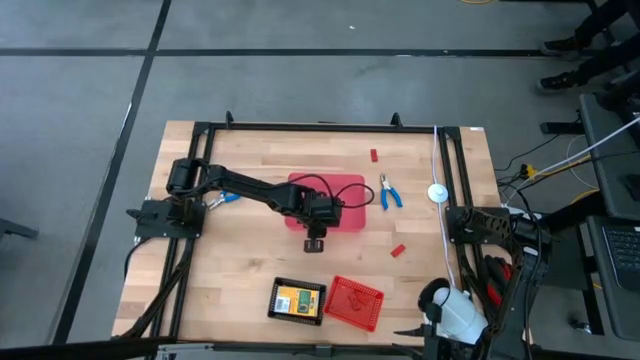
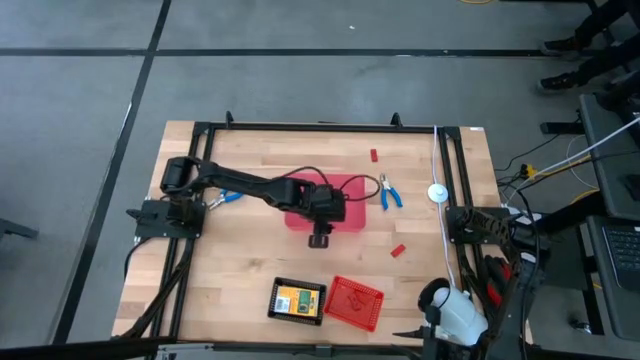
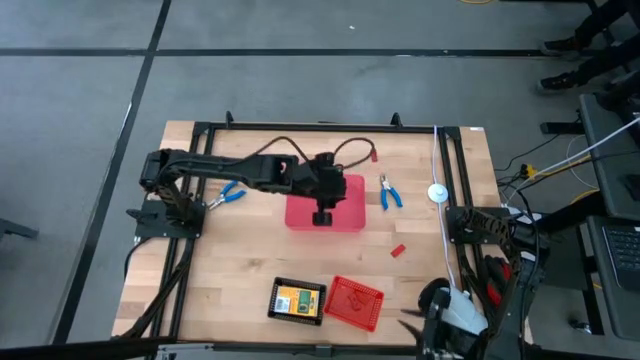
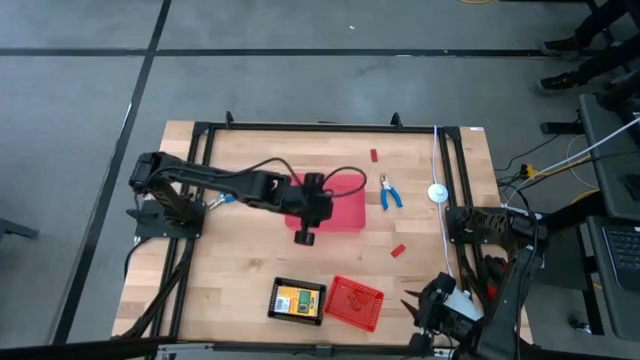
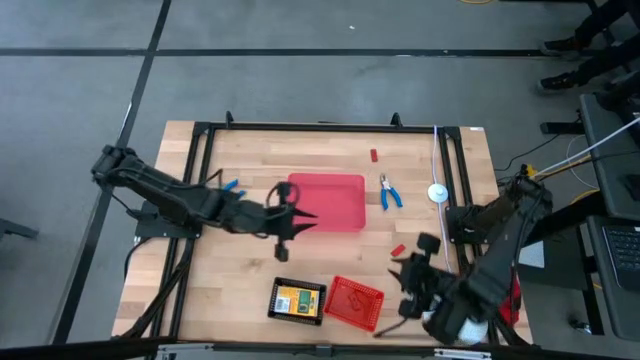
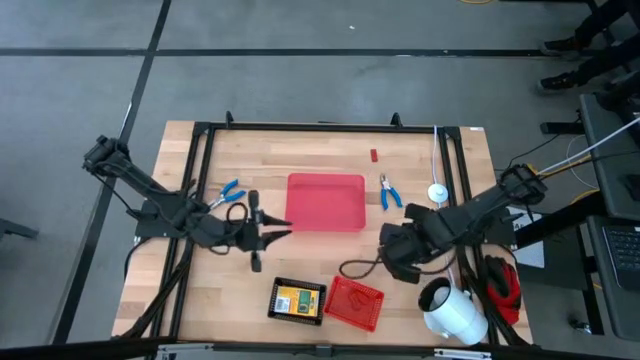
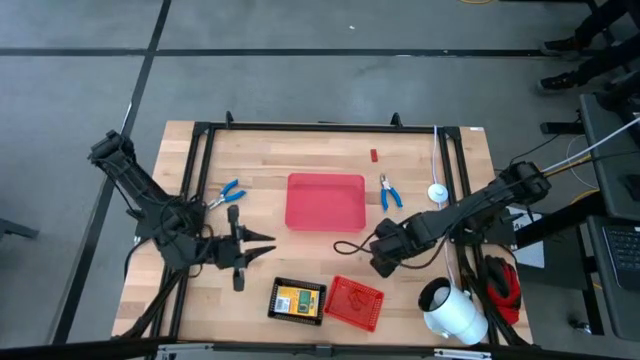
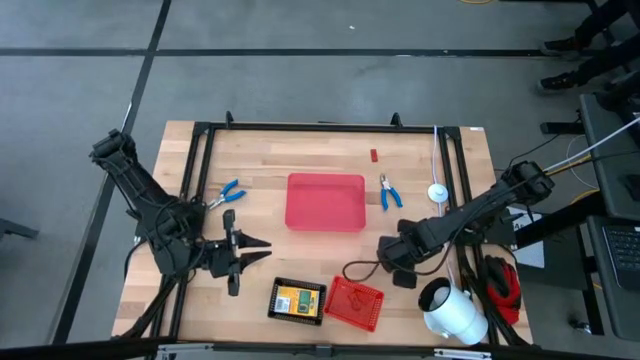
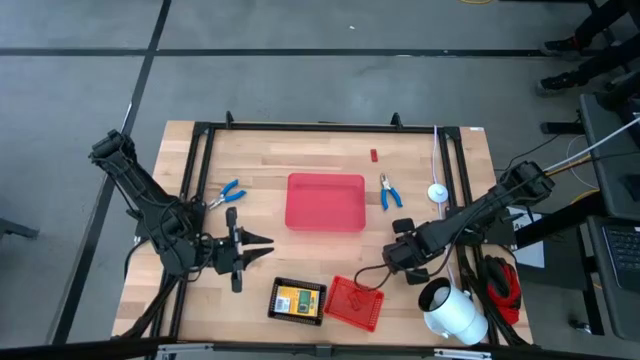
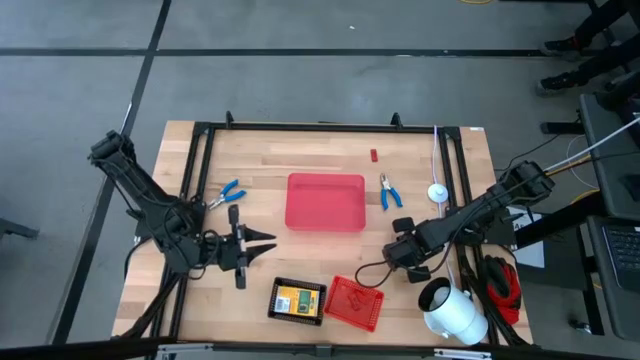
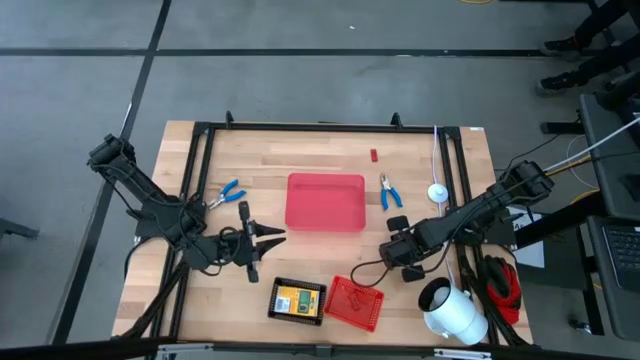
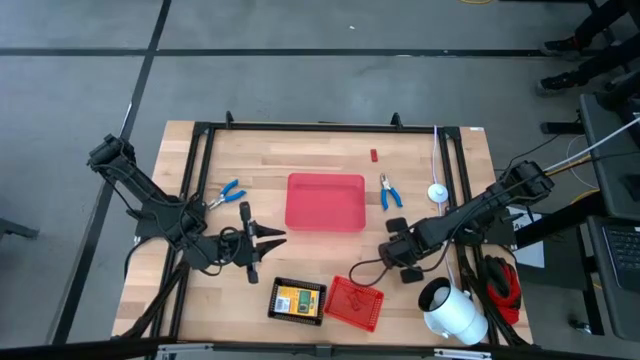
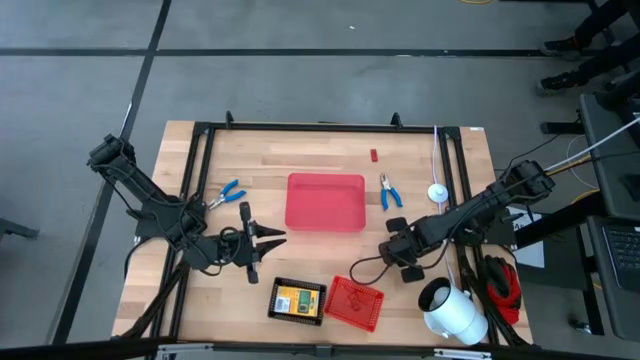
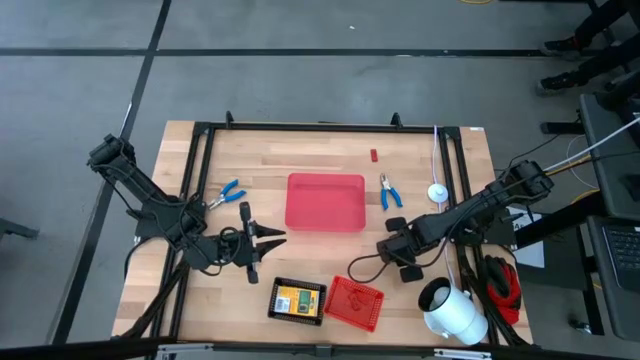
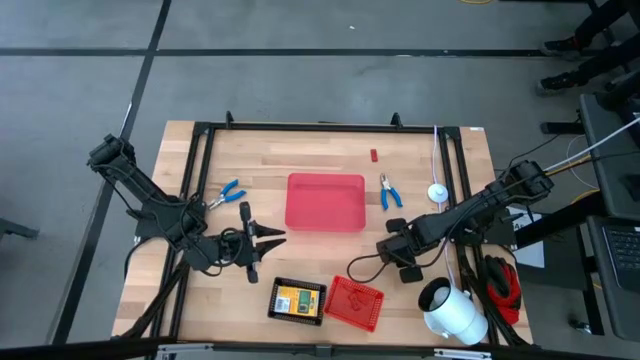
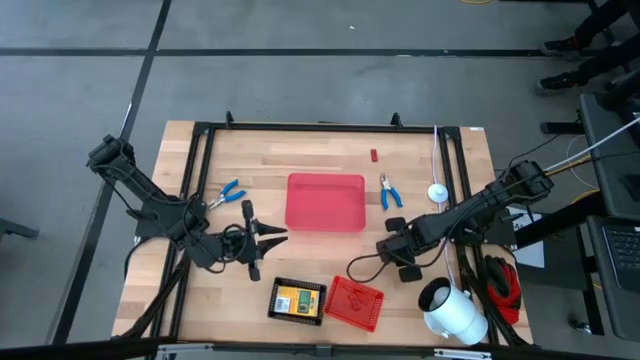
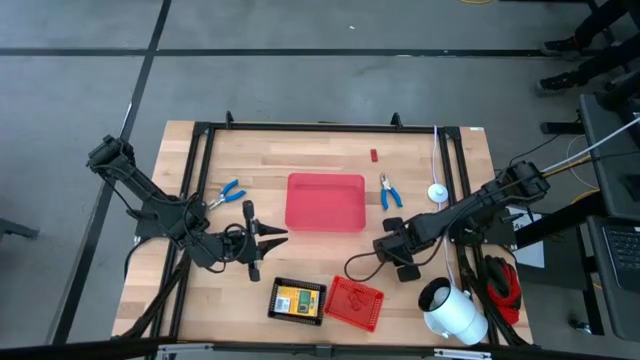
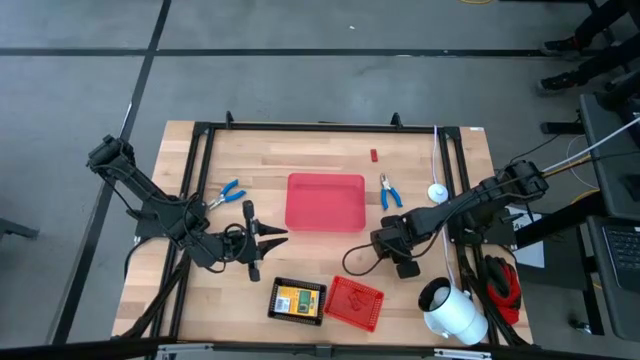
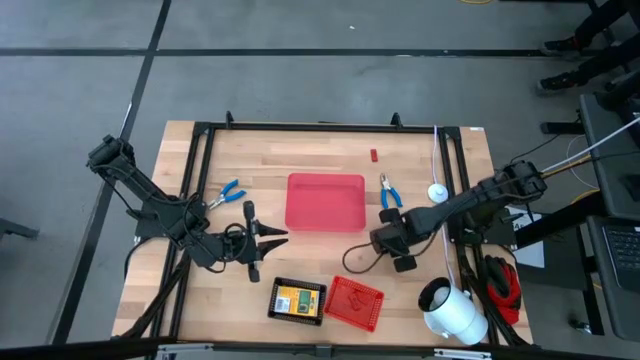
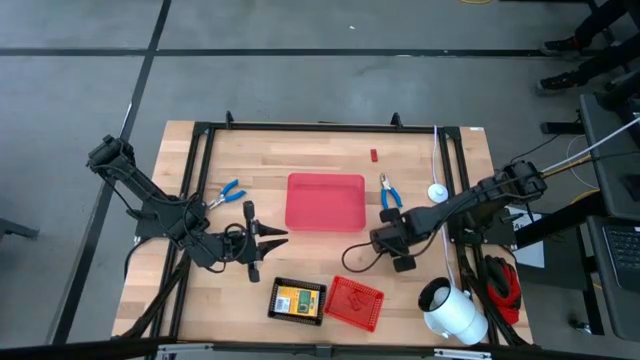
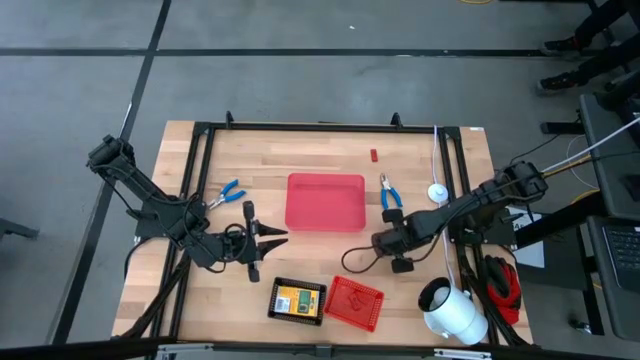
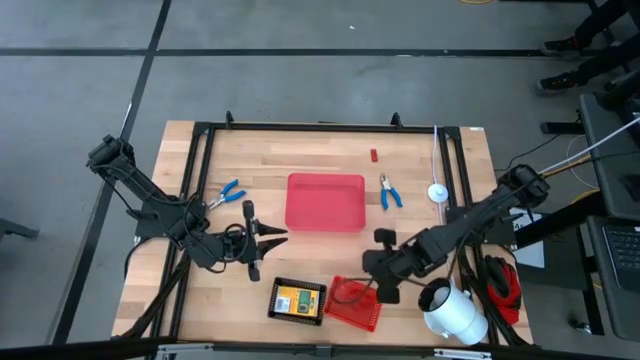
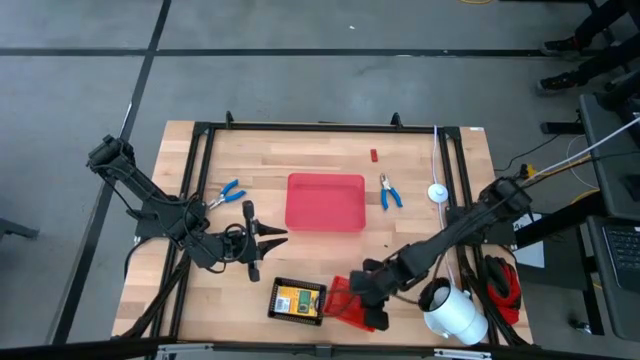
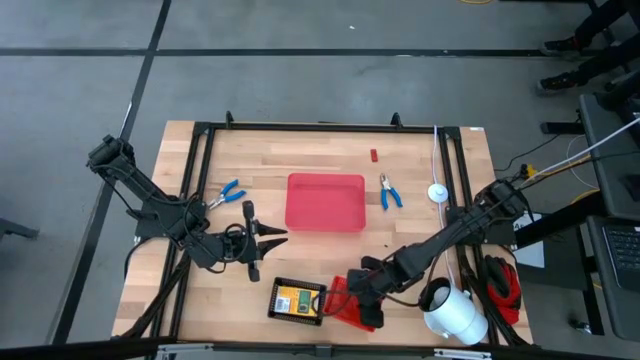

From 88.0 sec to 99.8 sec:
Task: Pick & Place School Supplies
Put the red eraser into the red bin

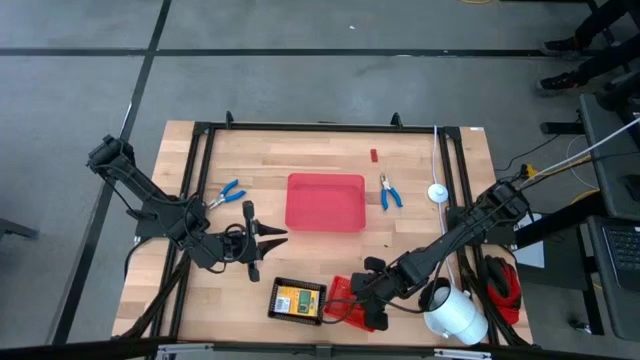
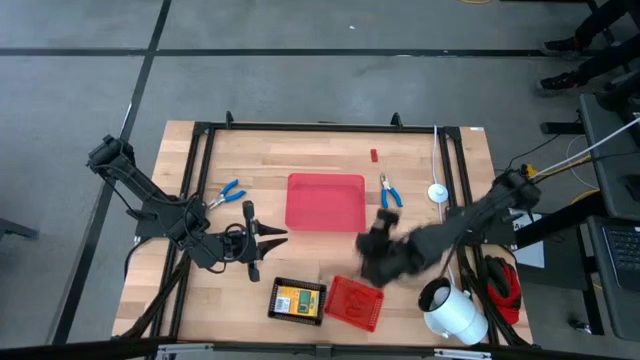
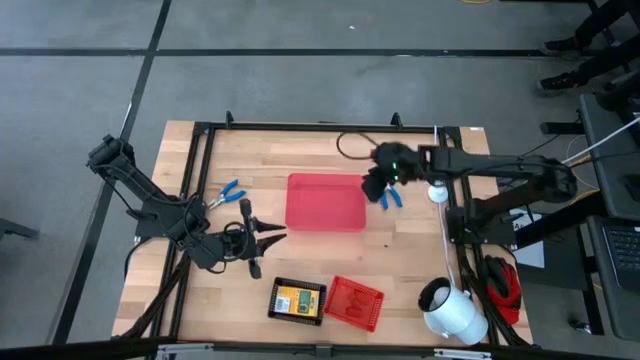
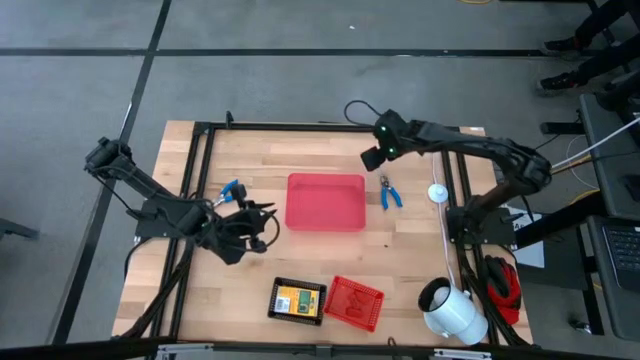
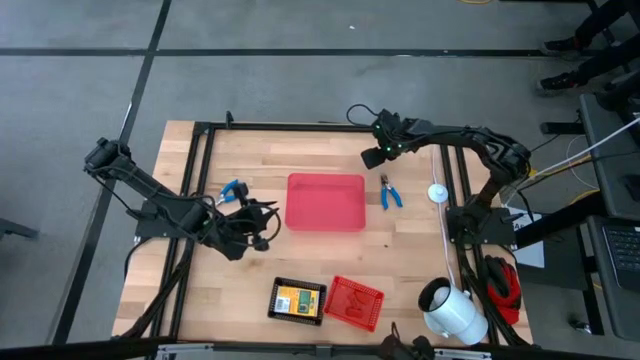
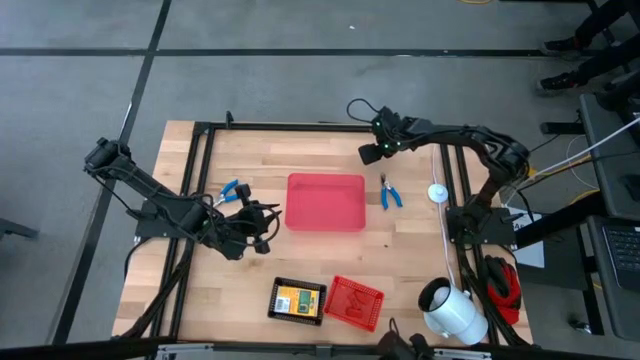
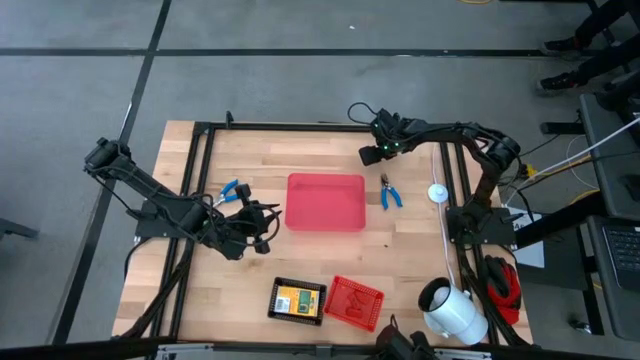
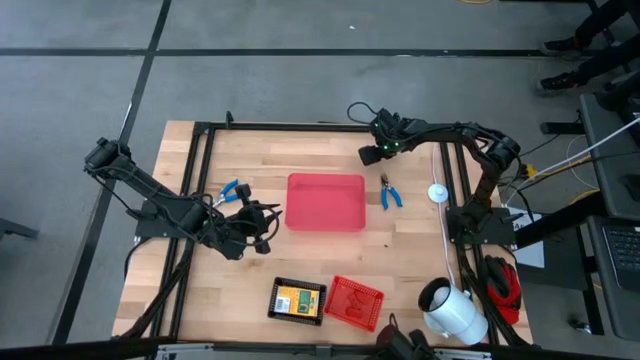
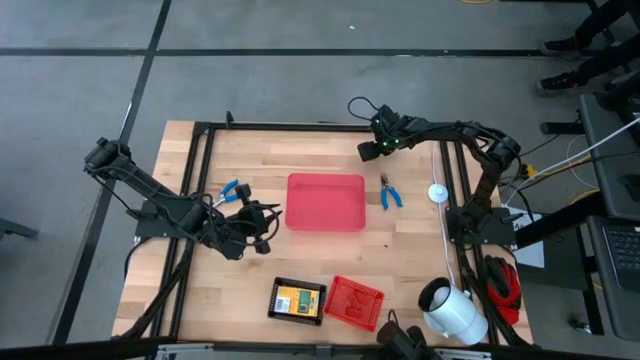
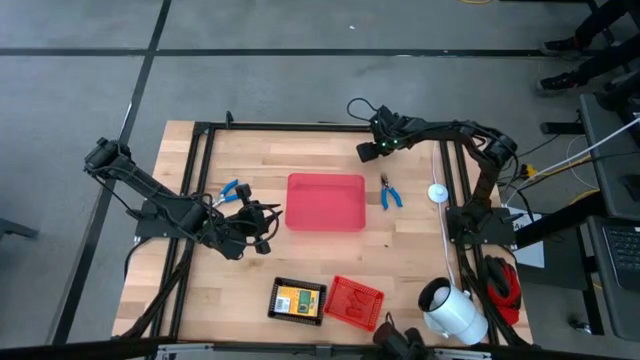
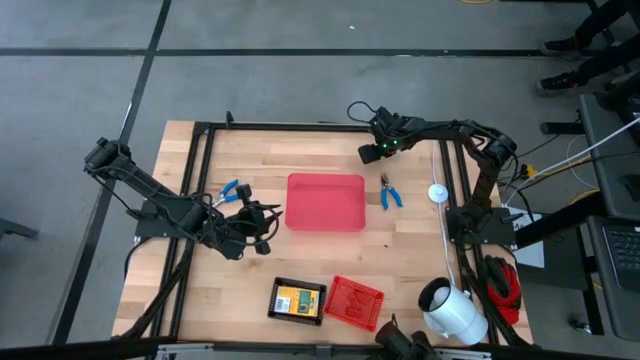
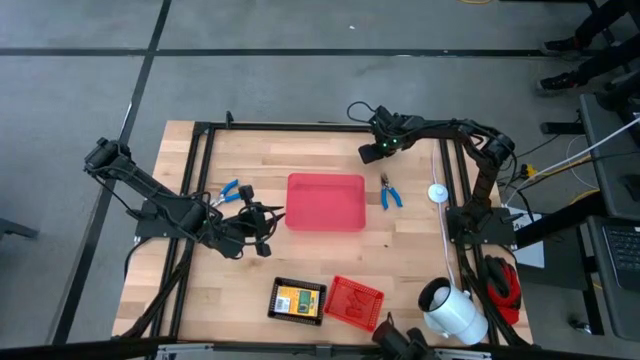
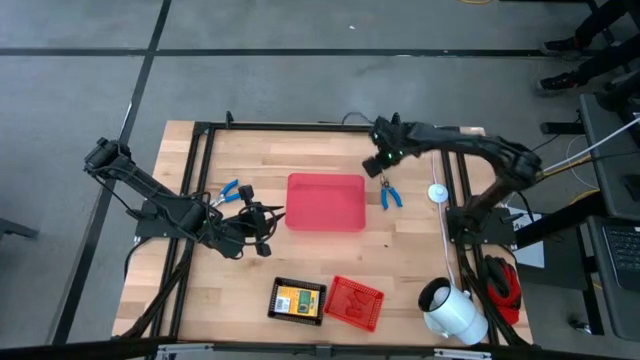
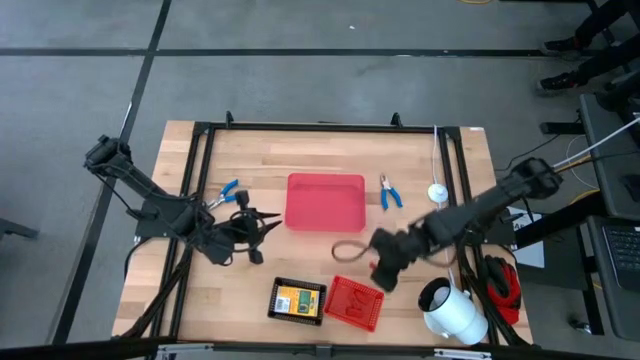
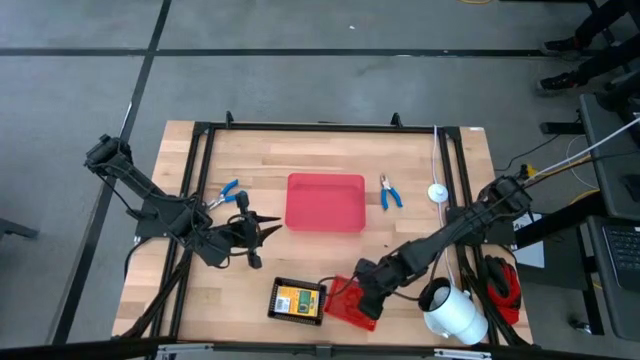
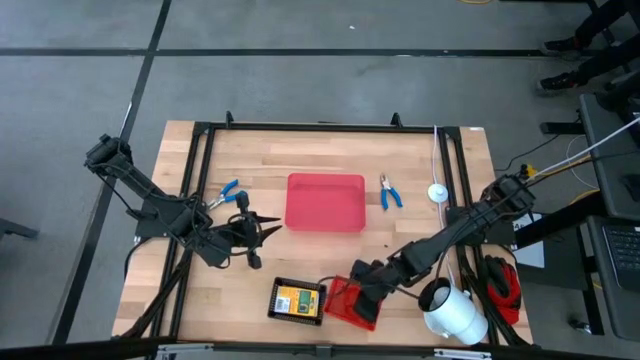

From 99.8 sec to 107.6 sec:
Put the red eraser into the red bin

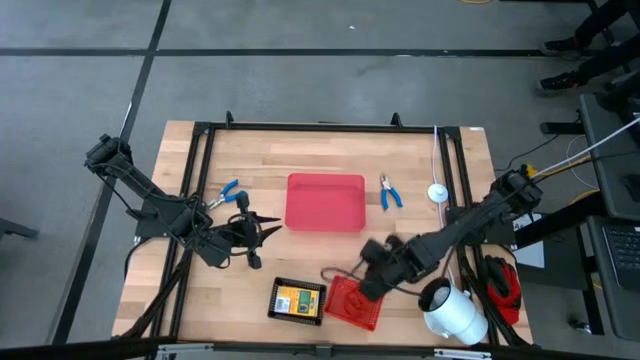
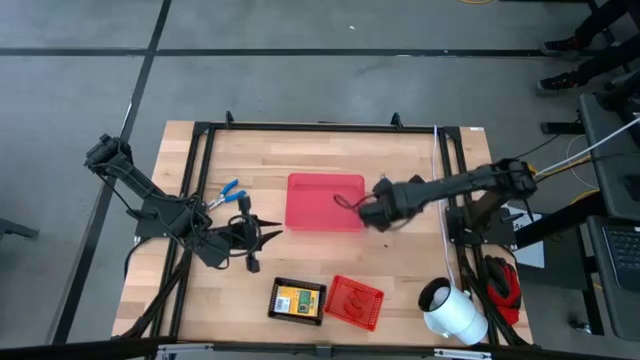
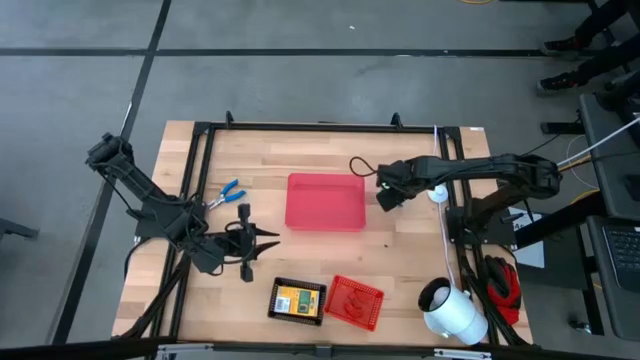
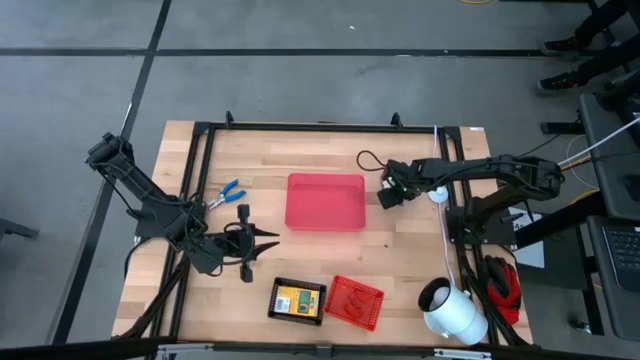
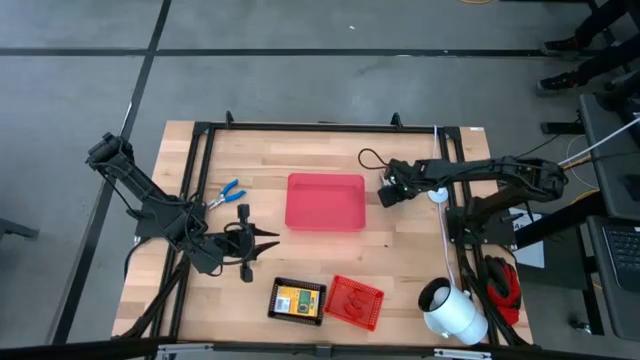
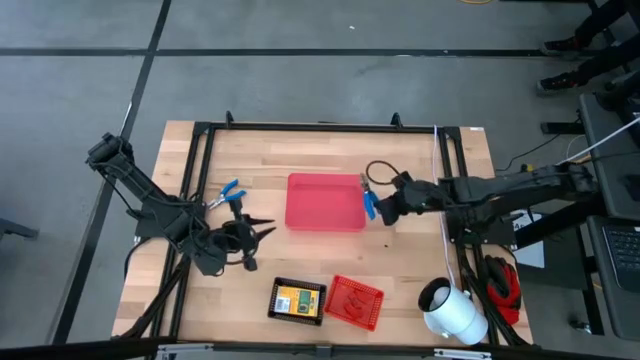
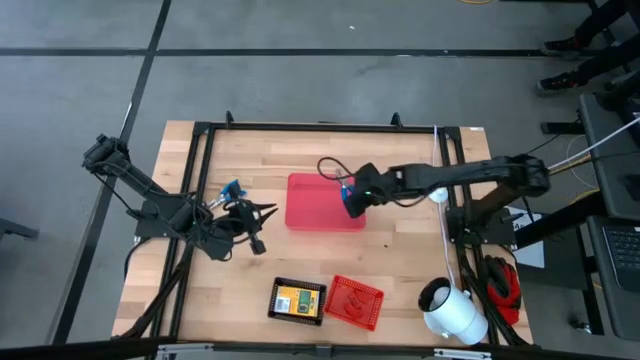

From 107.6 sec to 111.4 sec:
Put the blue paper puncher into the pink bin
